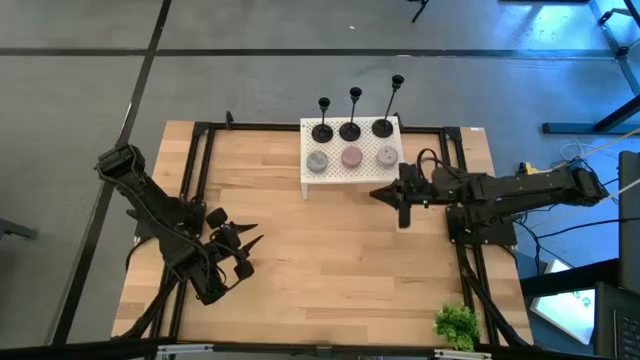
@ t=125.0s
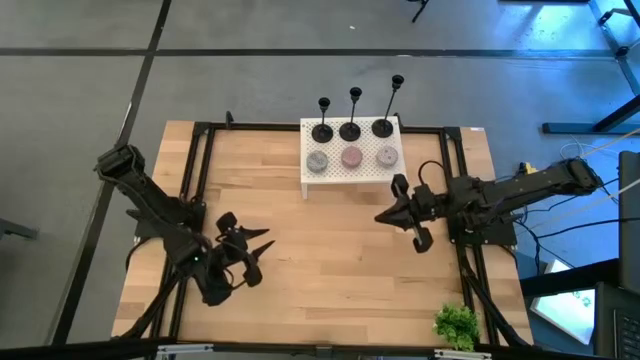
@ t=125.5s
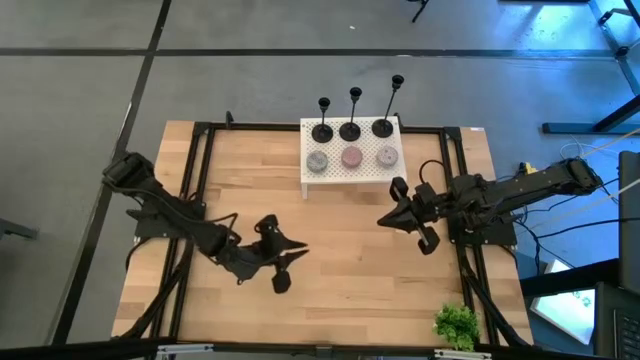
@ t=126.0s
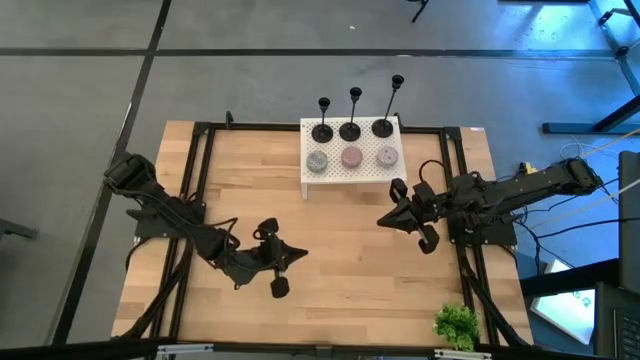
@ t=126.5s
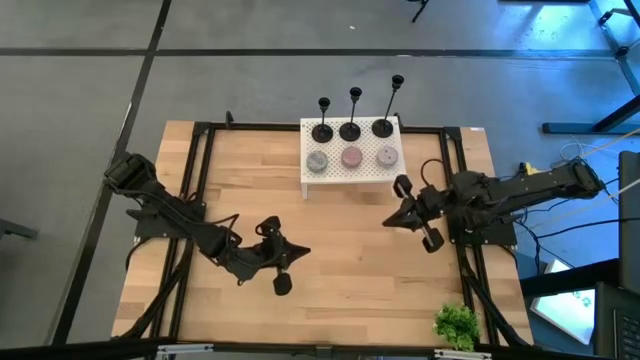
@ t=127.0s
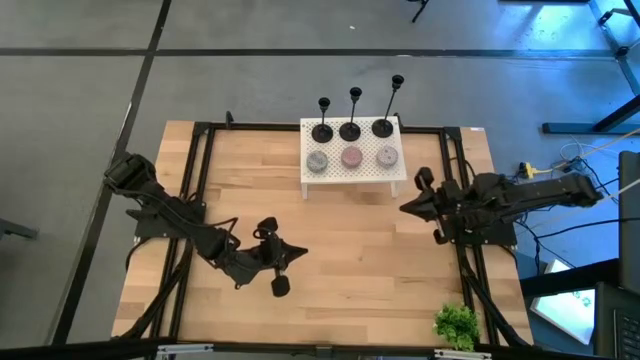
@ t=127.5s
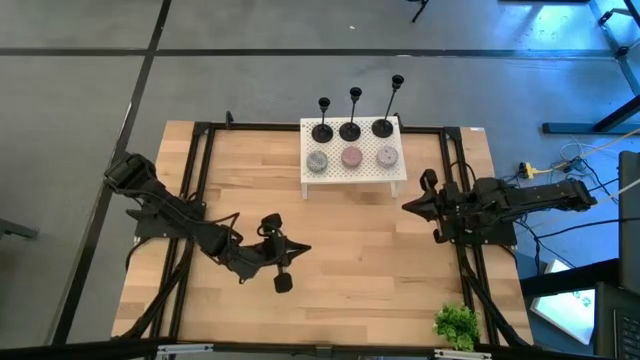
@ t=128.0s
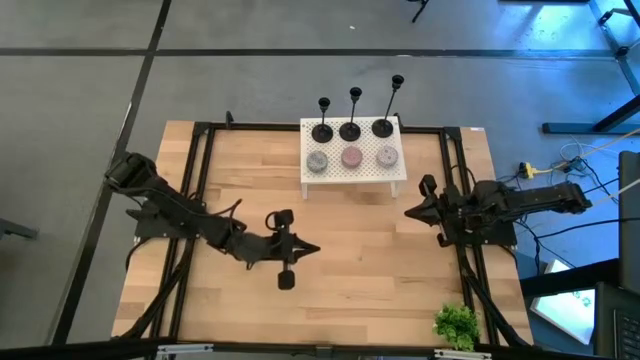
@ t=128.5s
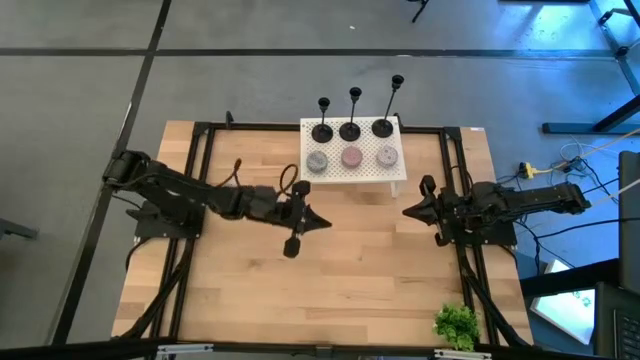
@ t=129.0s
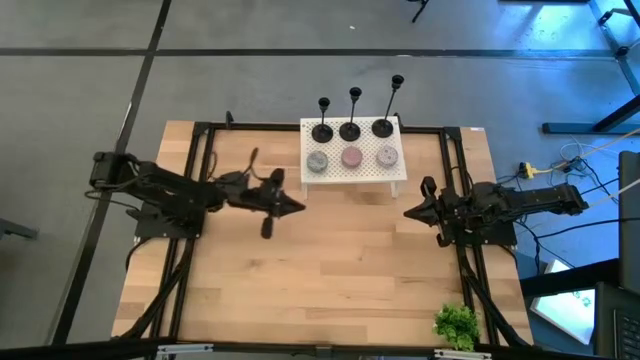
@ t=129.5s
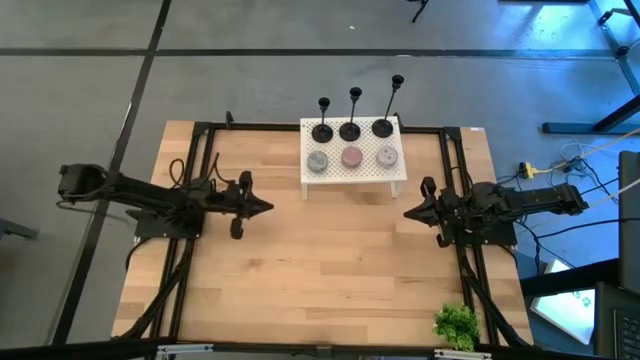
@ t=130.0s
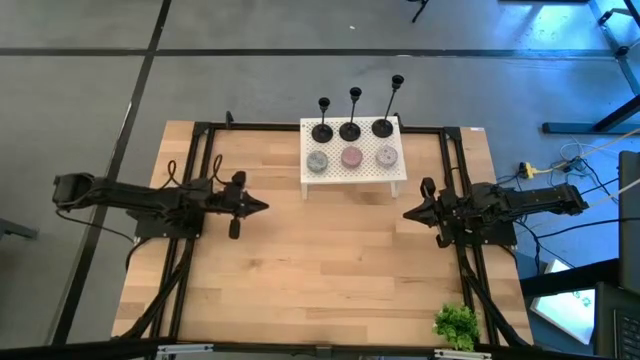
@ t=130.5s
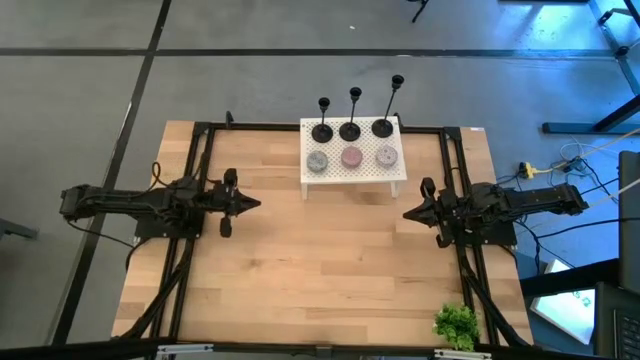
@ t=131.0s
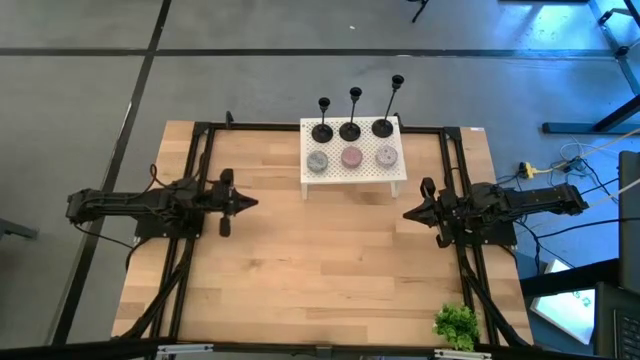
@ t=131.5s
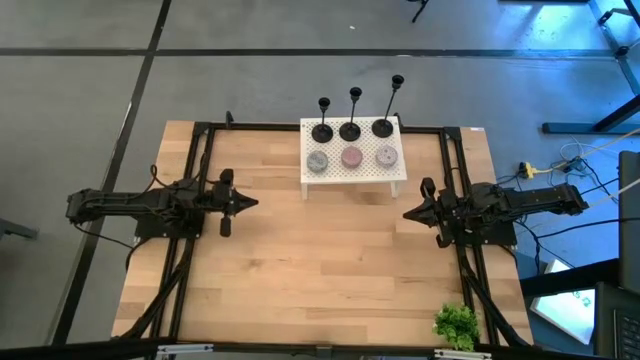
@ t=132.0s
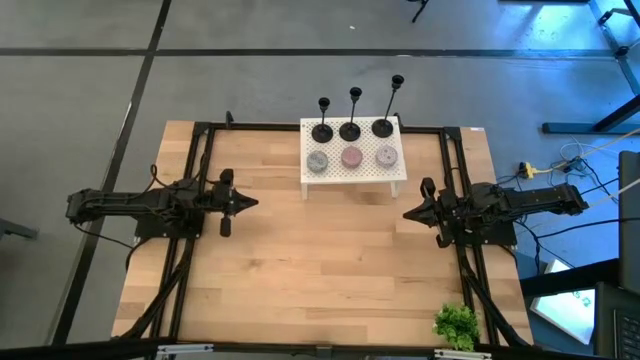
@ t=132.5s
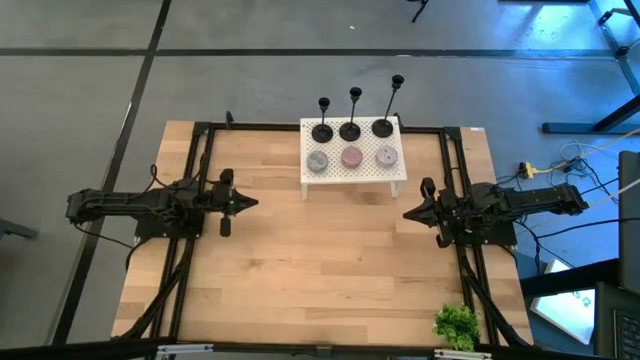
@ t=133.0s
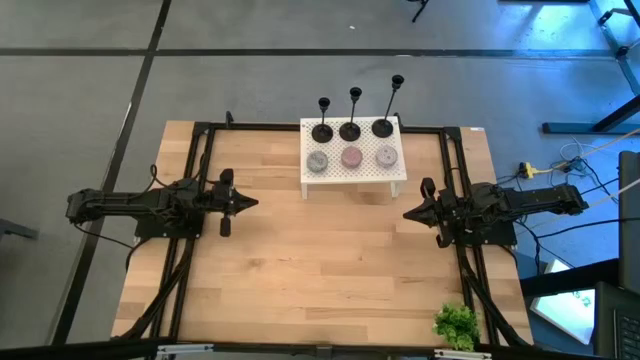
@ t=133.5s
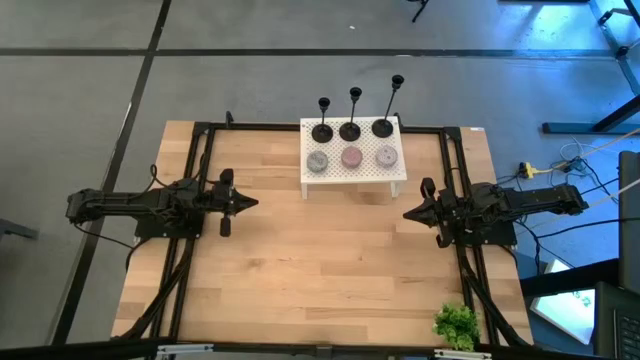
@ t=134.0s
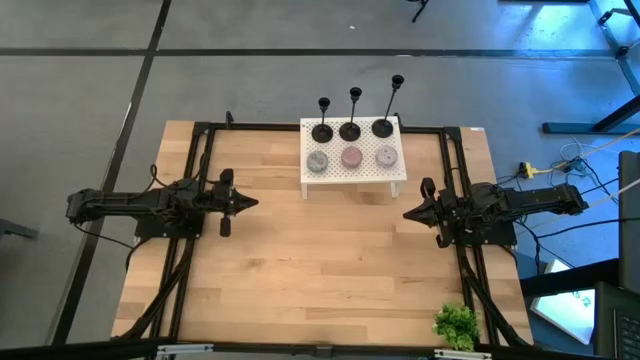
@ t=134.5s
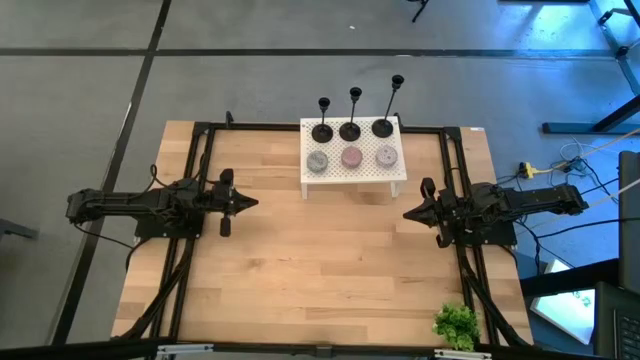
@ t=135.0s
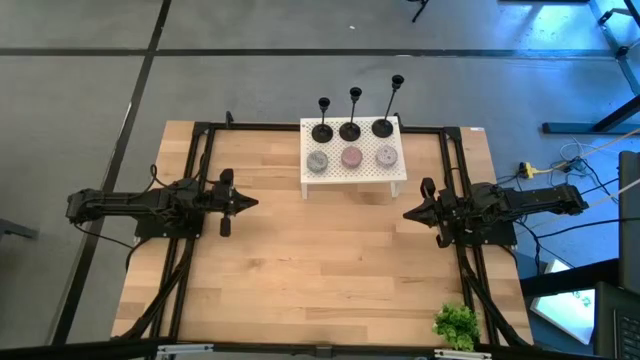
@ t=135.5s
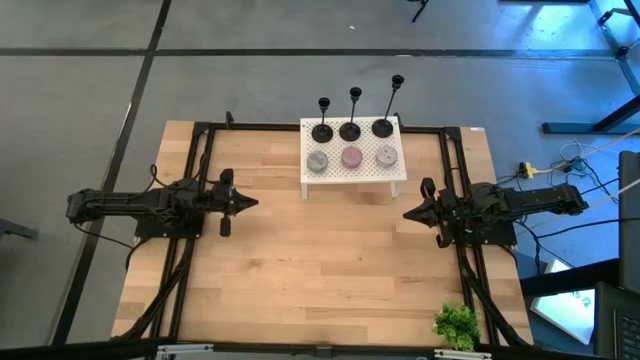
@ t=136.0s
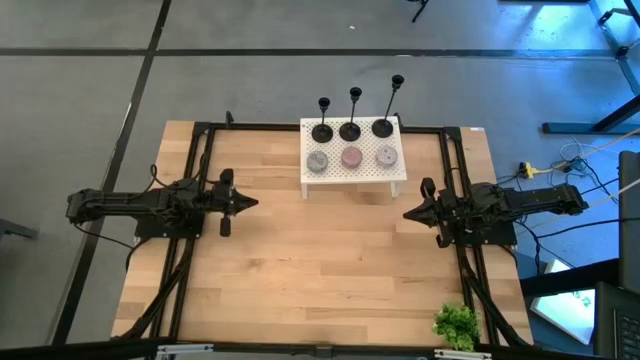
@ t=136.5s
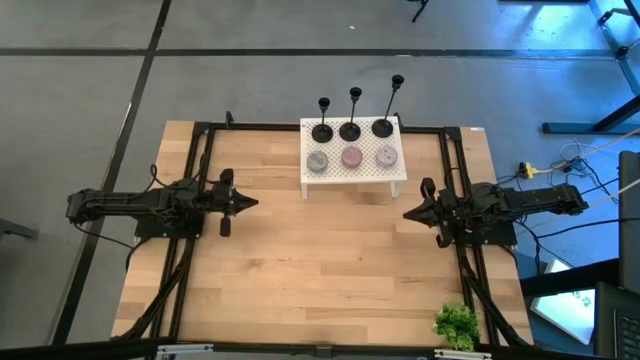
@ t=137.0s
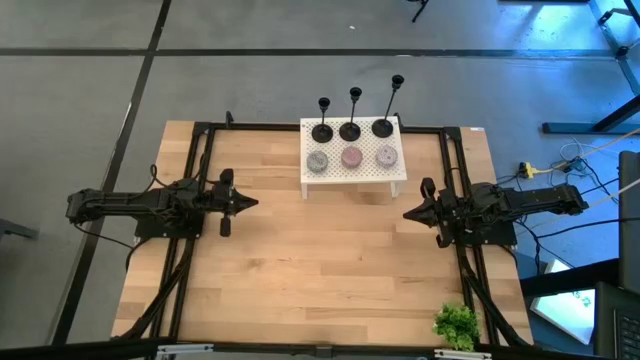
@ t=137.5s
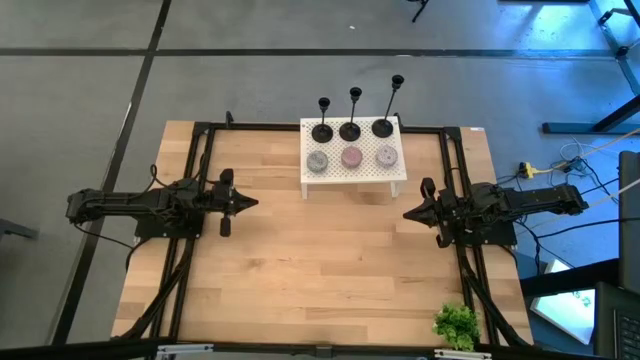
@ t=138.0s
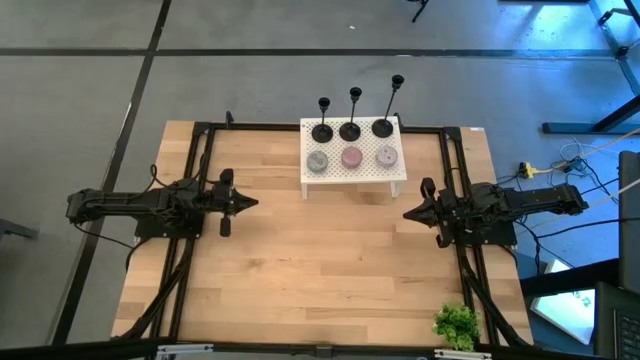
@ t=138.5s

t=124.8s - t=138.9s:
Task: Pick & Place candle stick holders
Return to Home Position

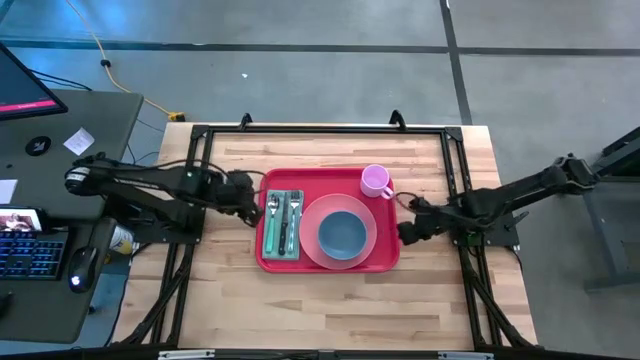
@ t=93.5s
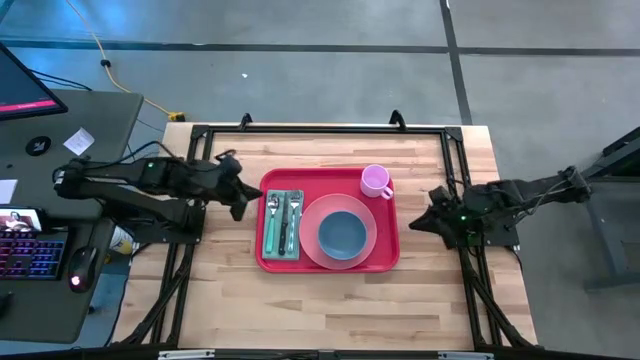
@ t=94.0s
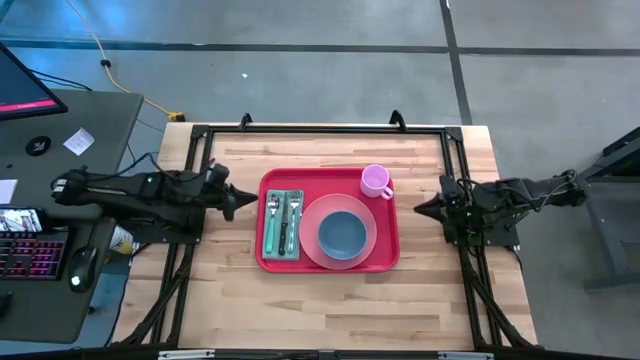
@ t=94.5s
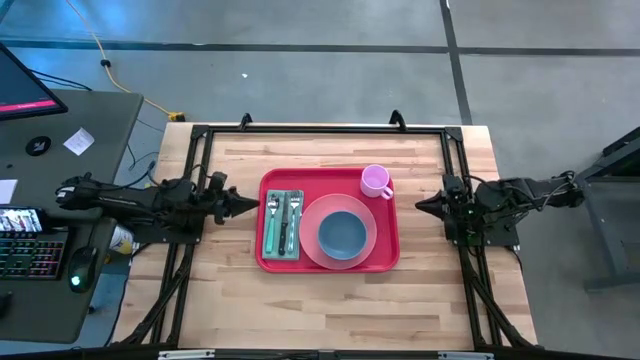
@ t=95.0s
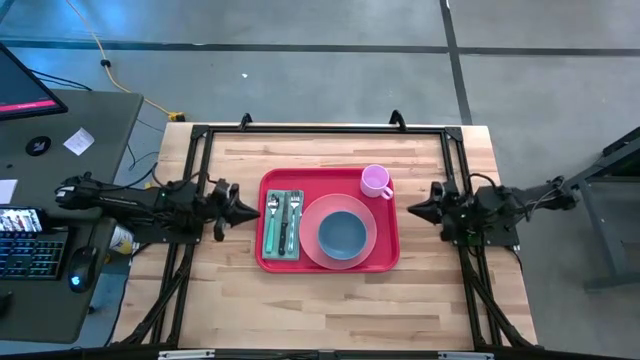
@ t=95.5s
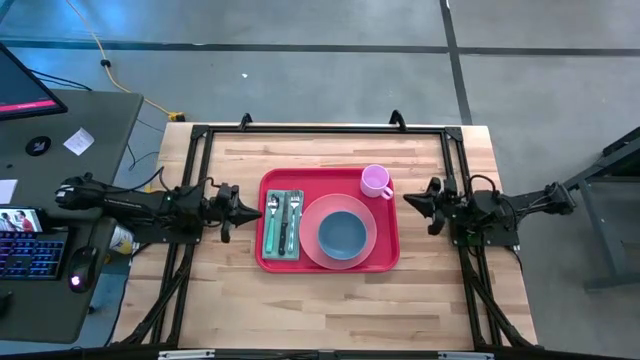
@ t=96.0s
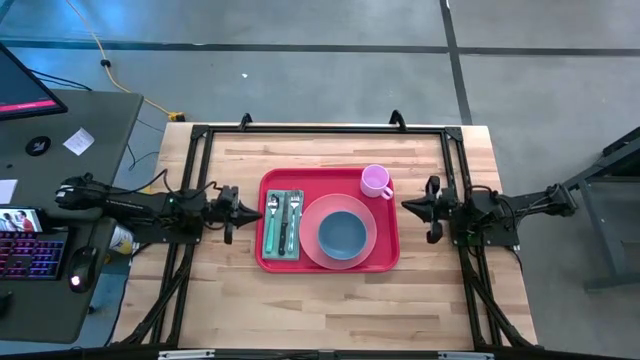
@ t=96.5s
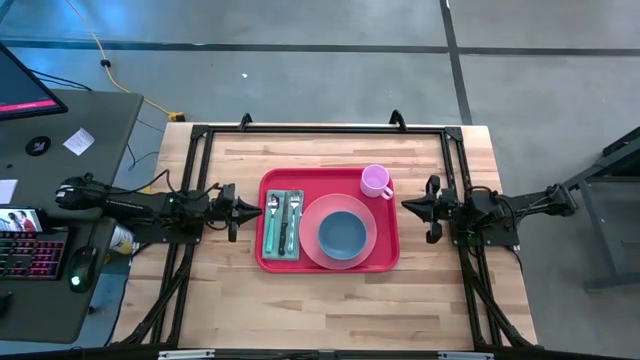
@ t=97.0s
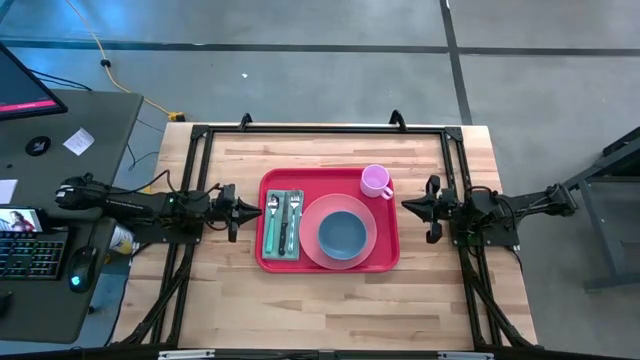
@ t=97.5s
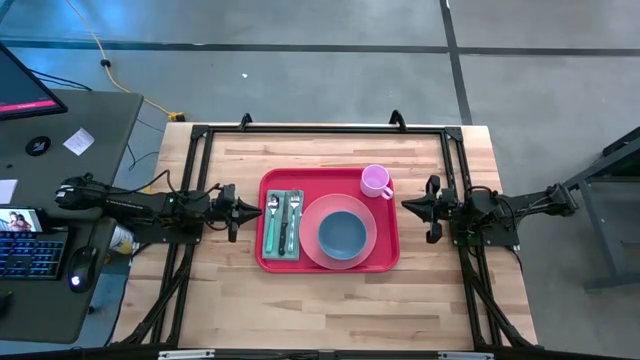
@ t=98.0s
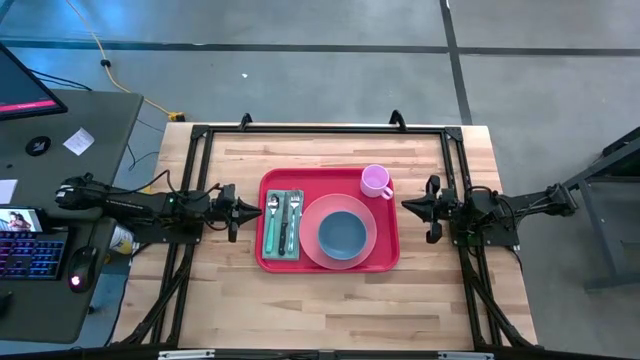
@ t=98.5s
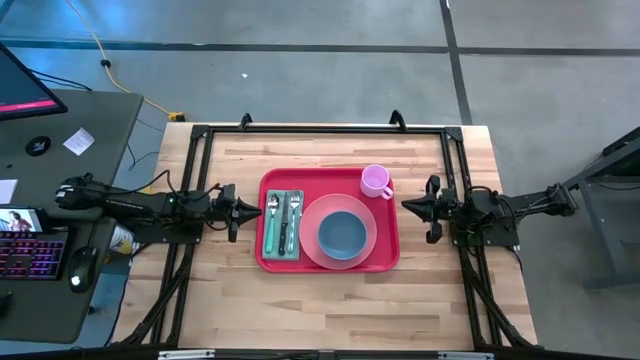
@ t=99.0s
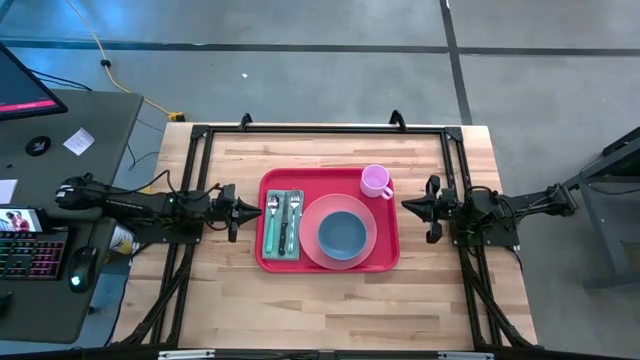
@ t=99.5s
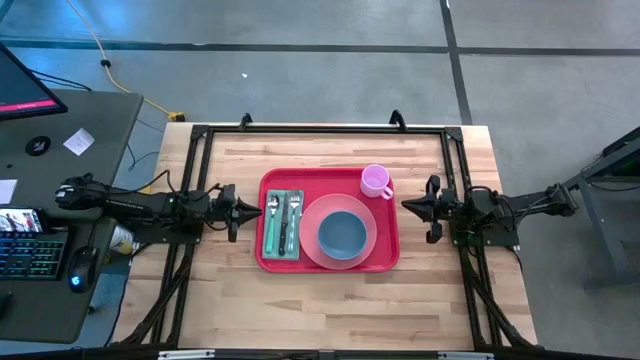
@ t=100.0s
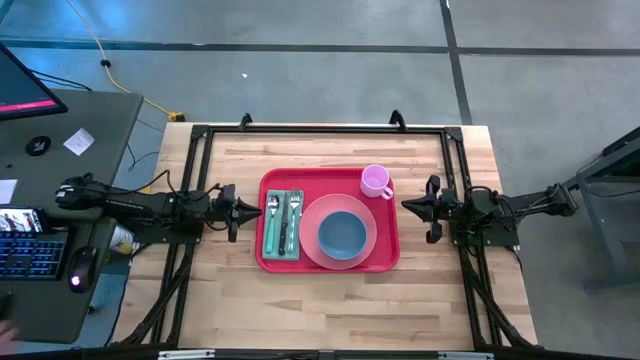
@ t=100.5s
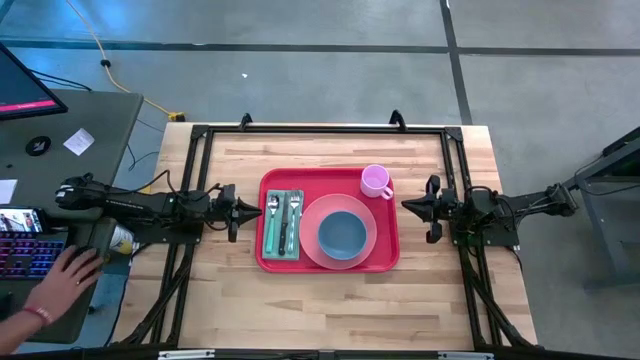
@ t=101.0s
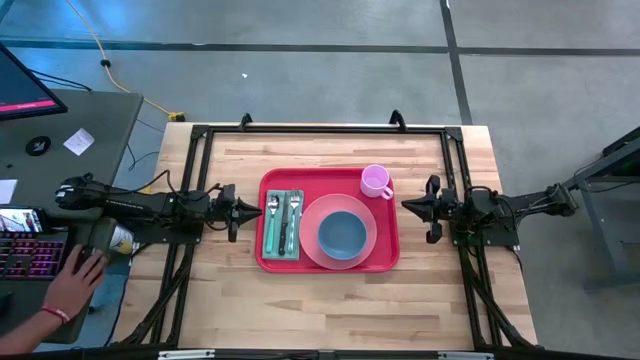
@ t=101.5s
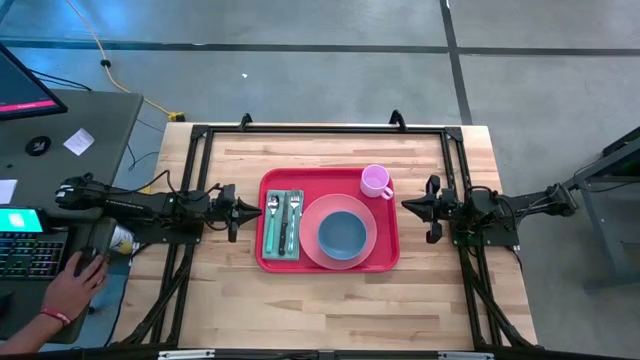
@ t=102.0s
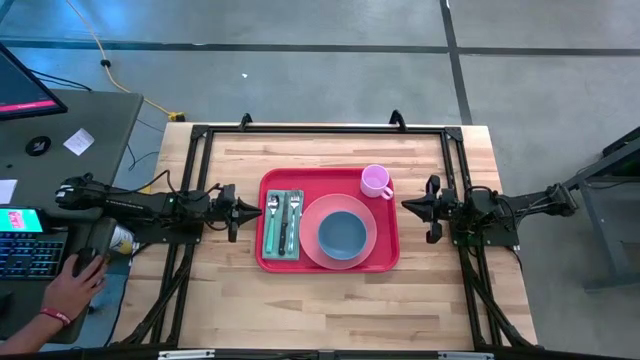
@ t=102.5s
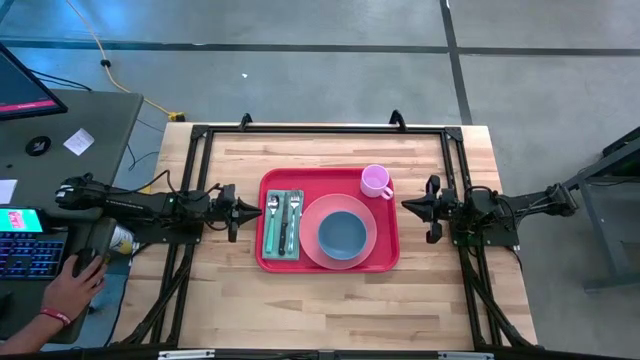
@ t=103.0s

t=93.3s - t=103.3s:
Task: Set up tray
Return to Home Position
